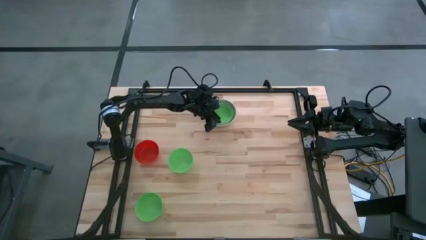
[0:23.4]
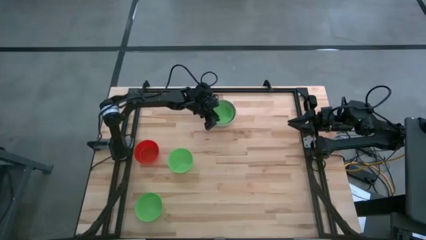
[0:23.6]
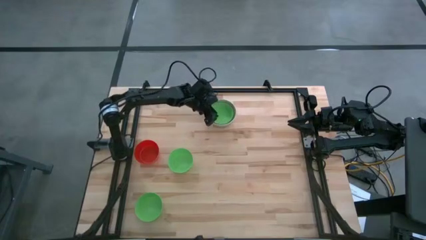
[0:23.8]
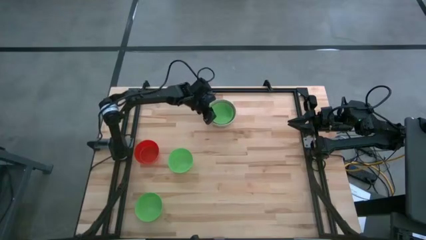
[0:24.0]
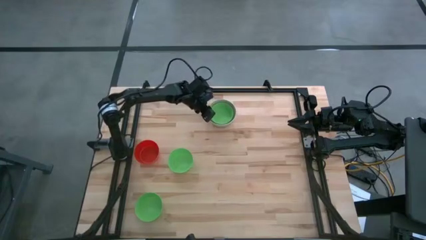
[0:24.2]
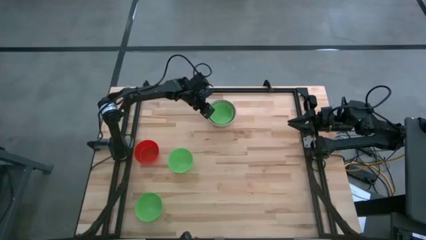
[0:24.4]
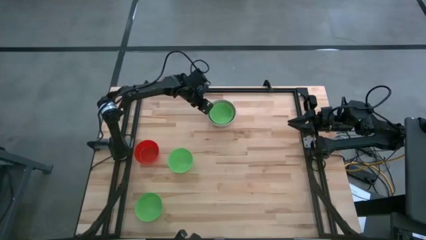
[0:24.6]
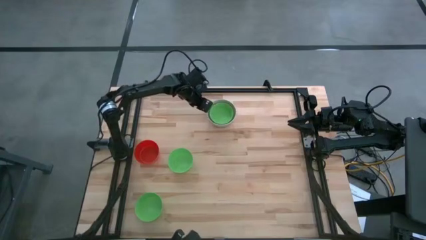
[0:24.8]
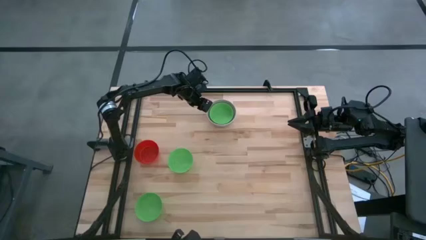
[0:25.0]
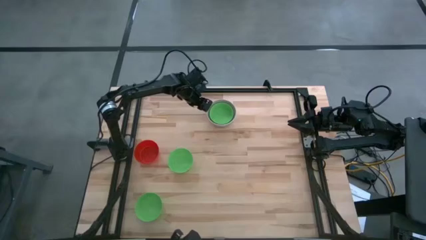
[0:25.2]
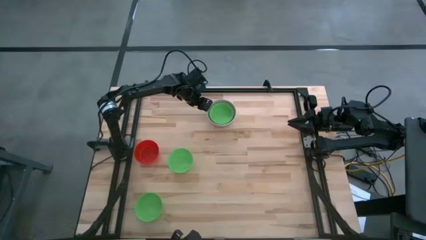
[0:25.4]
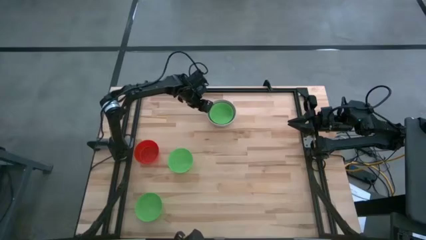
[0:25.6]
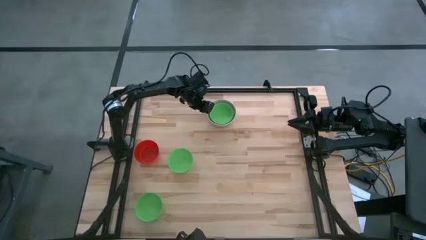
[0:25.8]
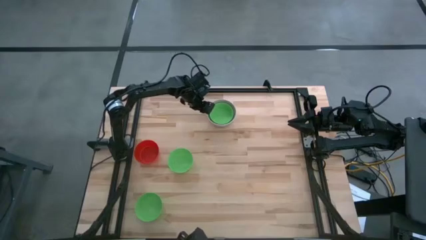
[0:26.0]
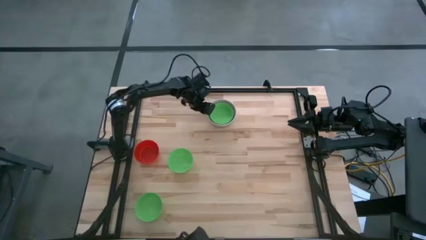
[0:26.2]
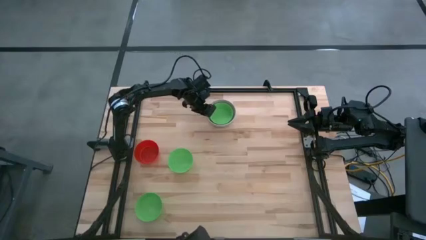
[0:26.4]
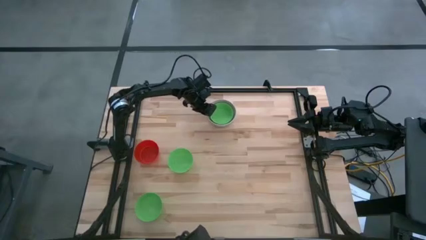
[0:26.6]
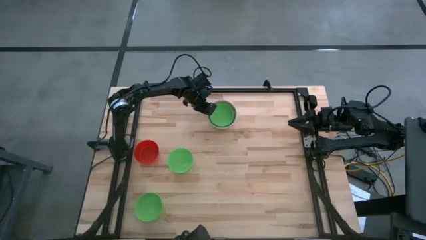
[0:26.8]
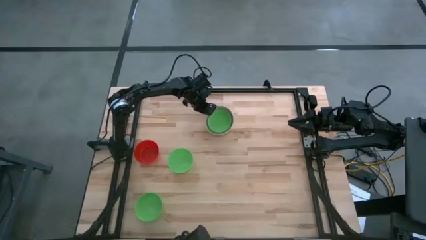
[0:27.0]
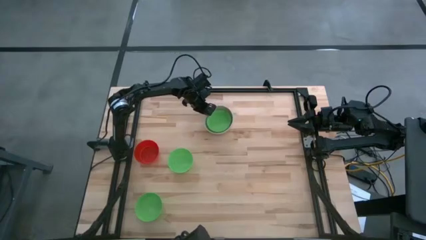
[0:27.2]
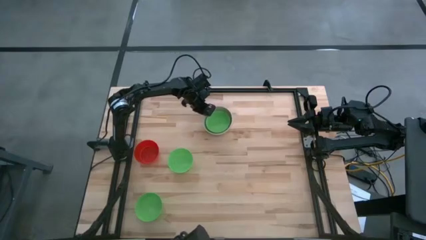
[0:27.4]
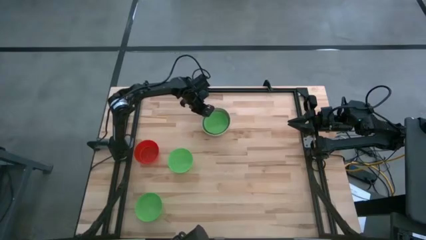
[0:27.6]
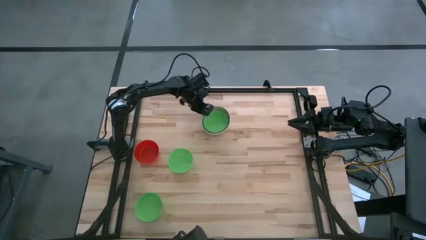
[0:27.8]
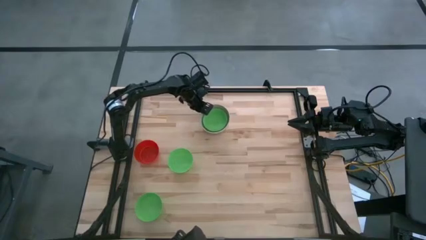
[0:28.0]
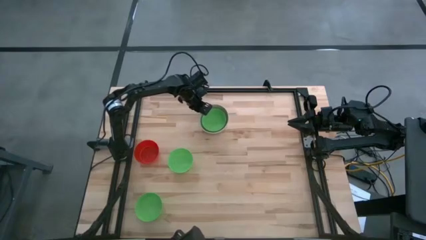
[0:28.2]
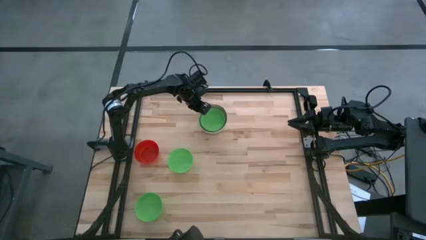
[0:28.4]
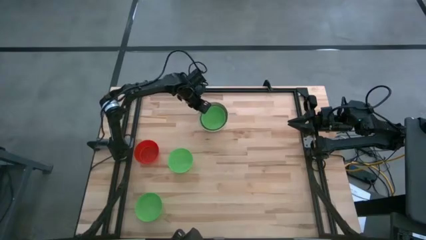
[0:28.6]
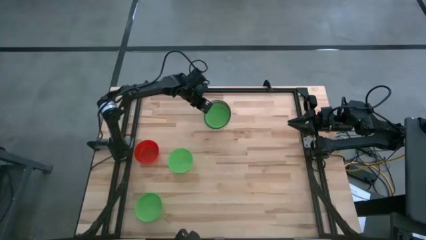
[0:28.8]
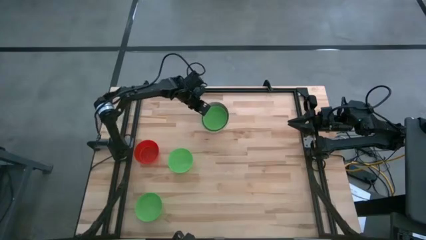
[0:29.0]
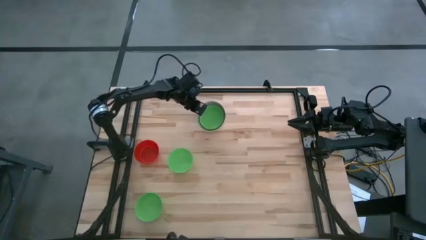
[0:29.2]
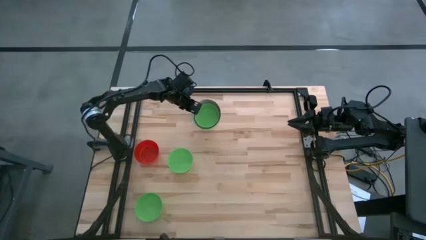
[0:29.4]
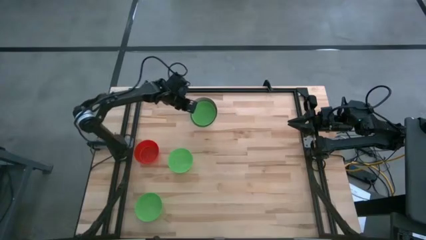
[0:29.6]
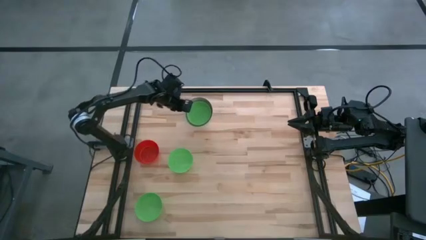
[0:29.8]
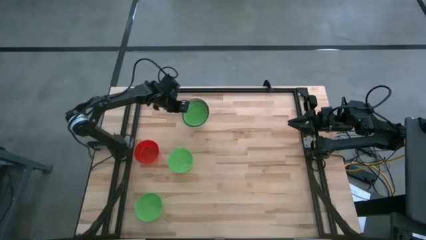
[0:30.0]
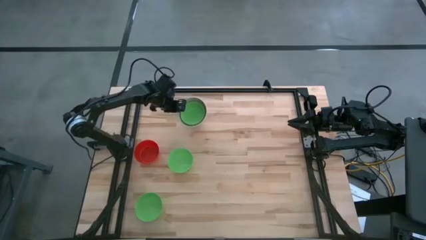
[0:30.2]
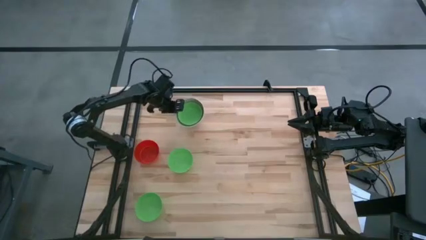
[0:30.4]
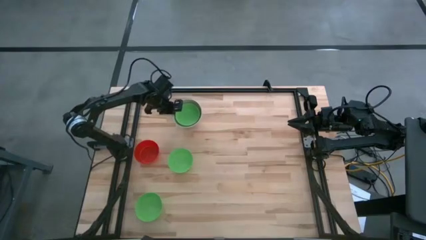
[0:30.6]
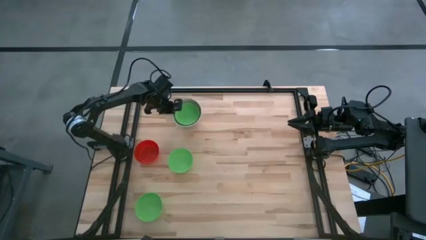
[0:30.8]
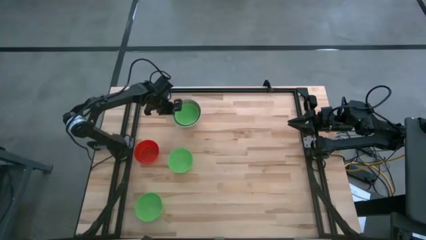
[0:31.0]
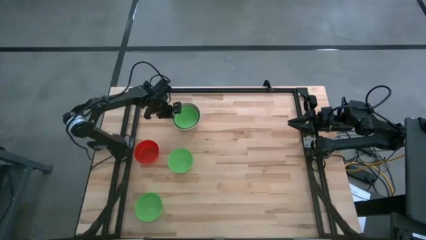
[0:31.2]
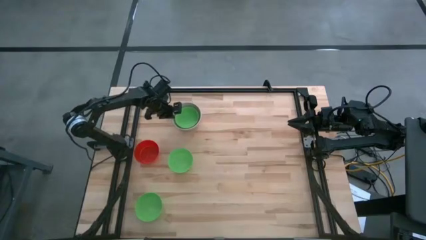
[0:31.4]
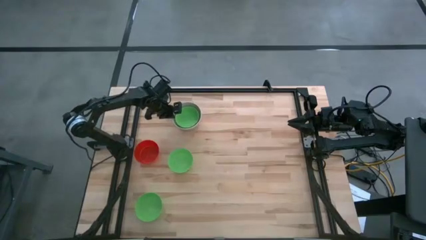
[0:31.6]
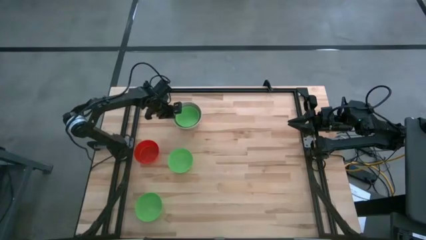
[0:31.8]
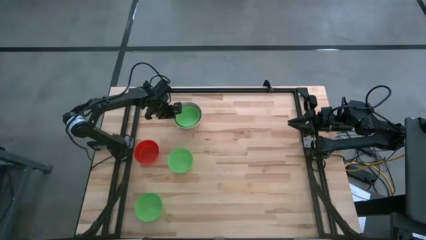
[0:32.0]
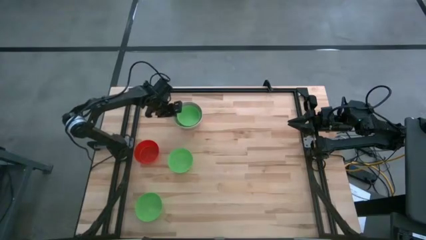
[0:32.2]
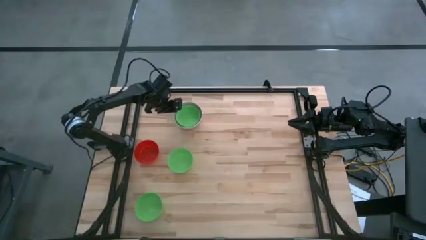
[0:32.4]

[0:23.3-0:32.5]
Move the stacked bowls to the left
